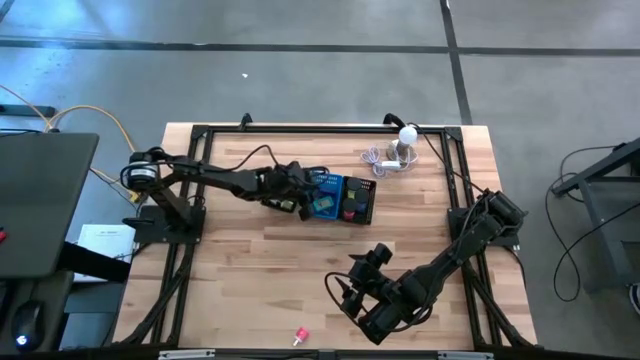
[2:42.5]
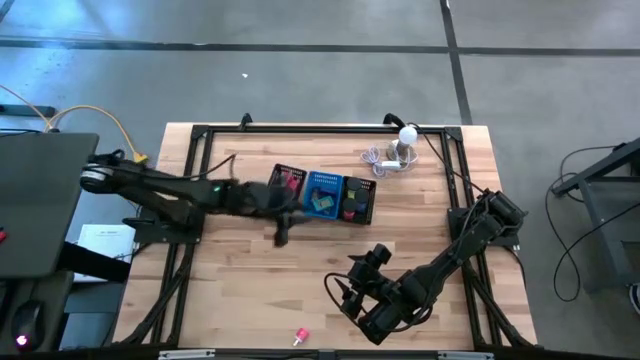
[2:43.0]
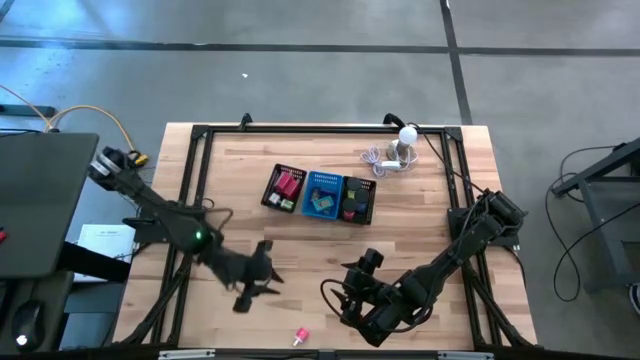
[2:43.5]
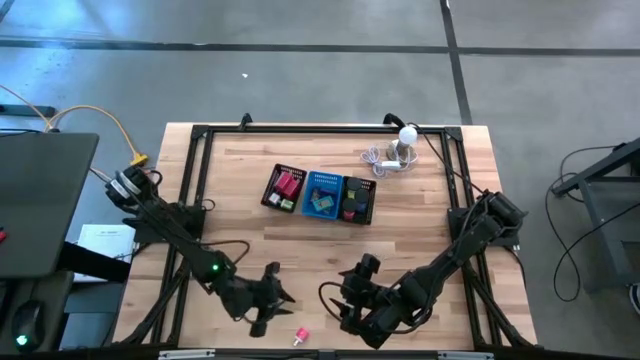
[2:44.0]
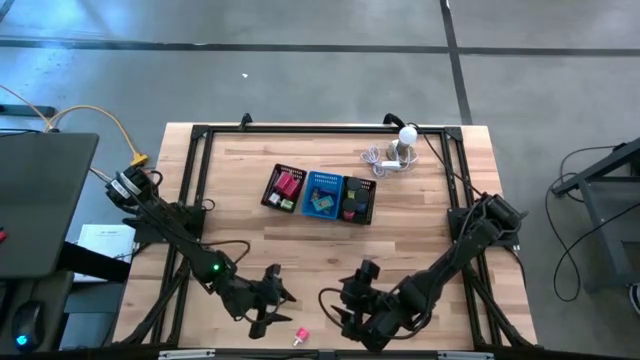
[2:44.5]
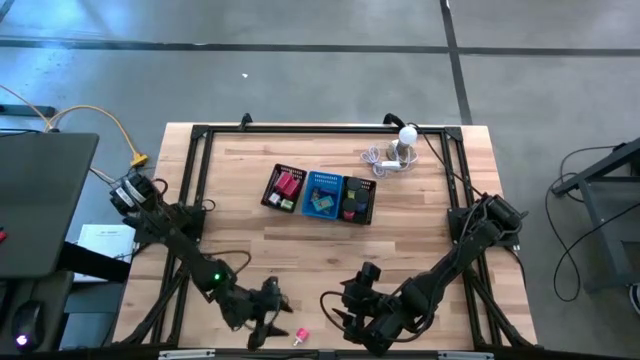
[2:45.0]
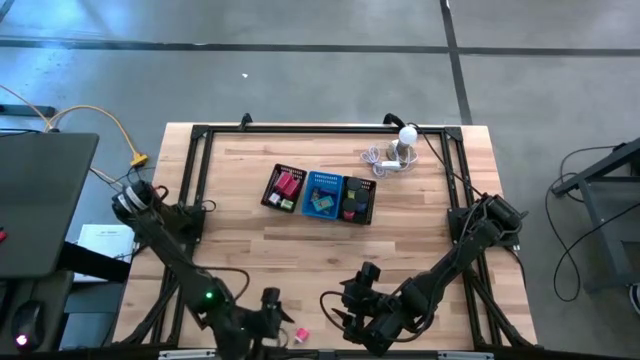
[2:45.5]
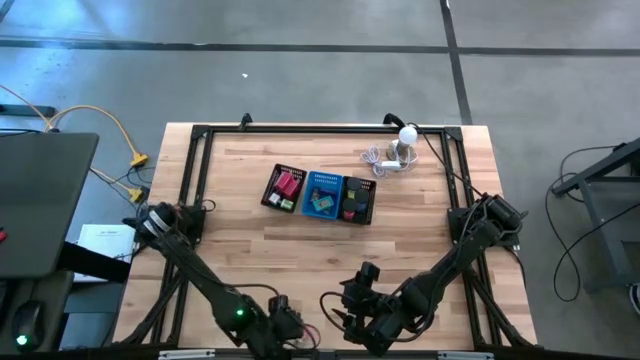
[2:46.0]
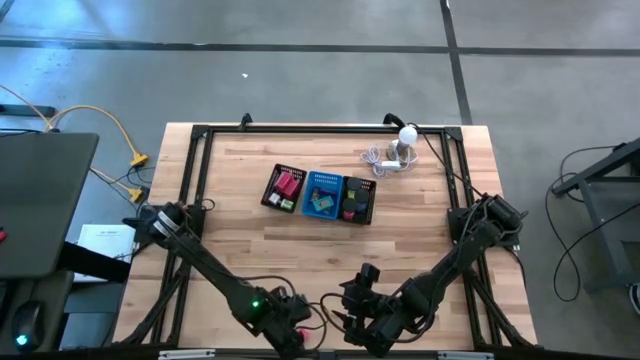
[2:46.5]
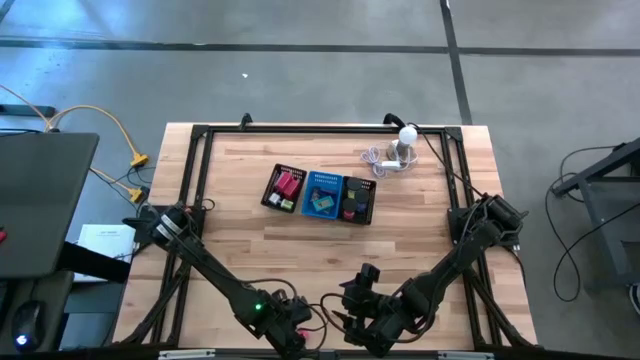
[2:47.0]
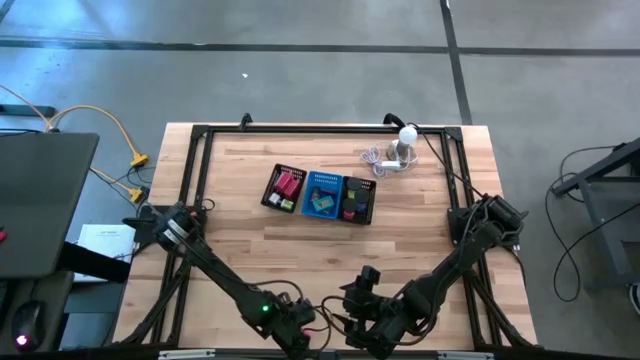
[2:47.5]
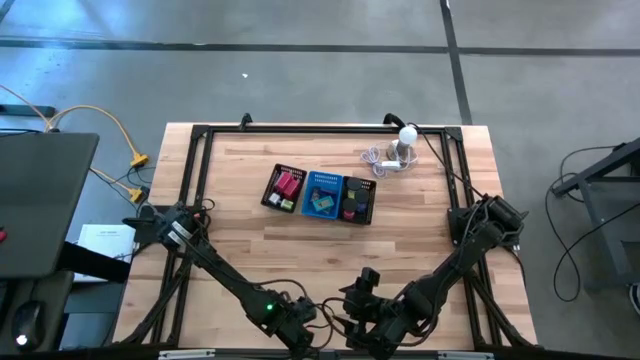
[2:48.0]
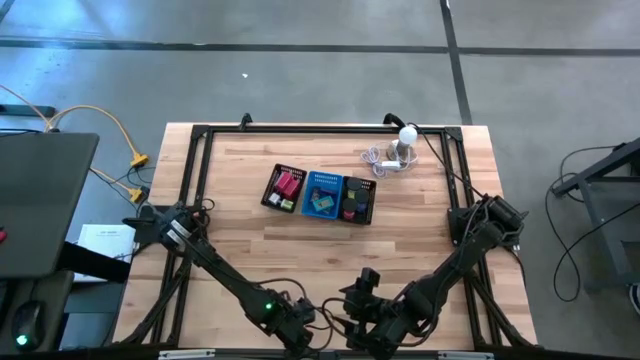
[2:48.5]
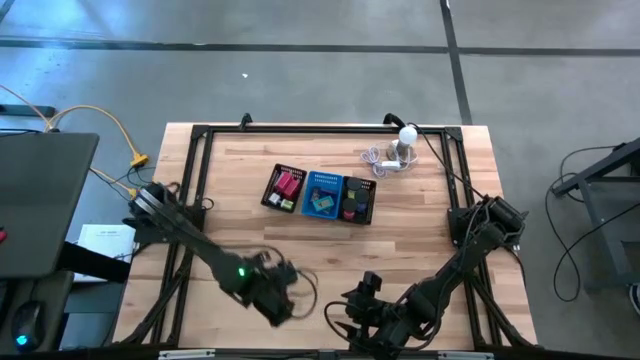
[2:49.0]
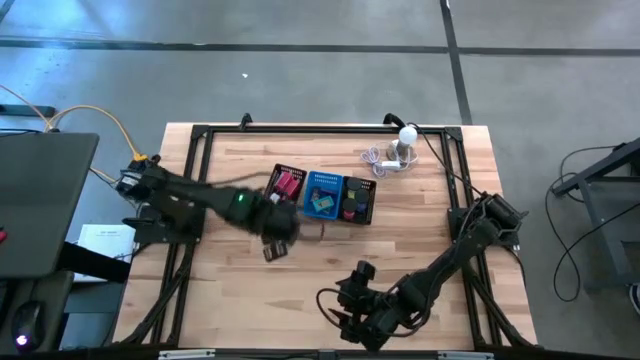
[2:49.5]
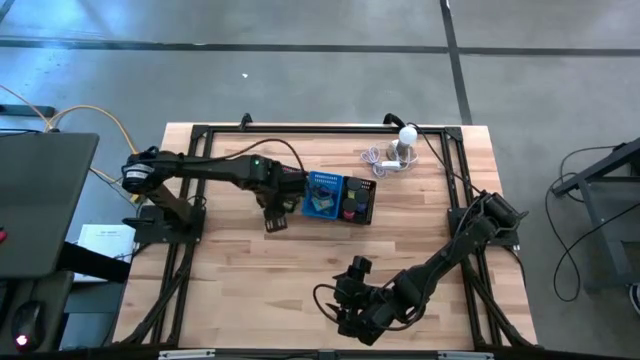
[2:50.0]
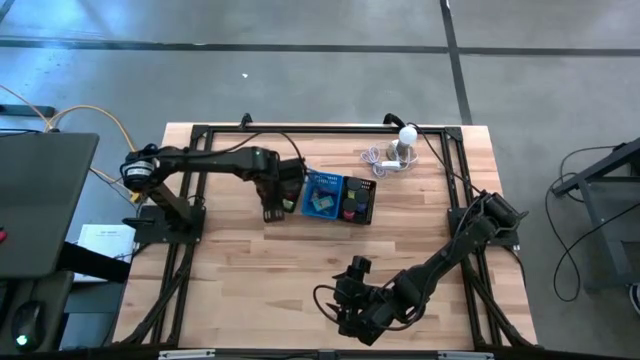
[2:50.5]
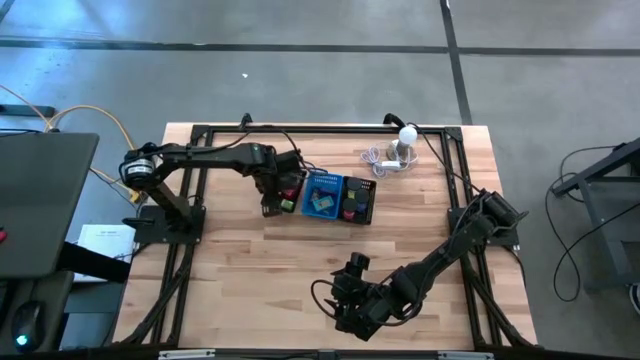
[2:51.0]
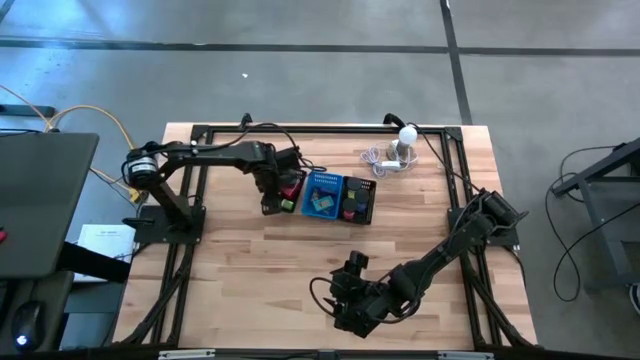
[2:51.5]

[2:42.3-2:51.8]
Task: Pick & Place Office items
Put the pink charger adapter into the left black bin

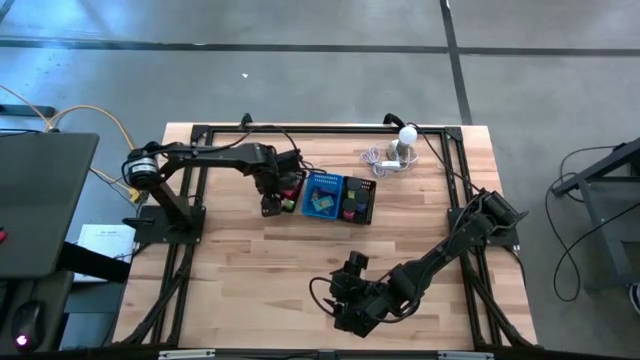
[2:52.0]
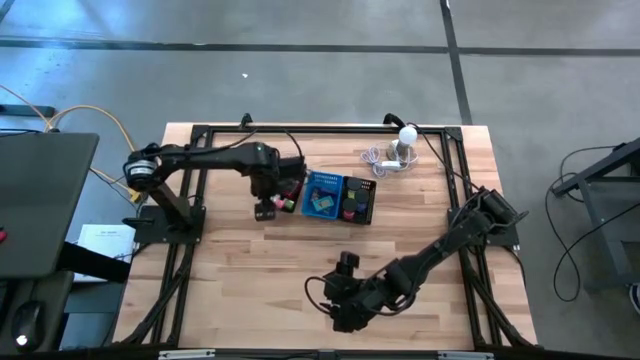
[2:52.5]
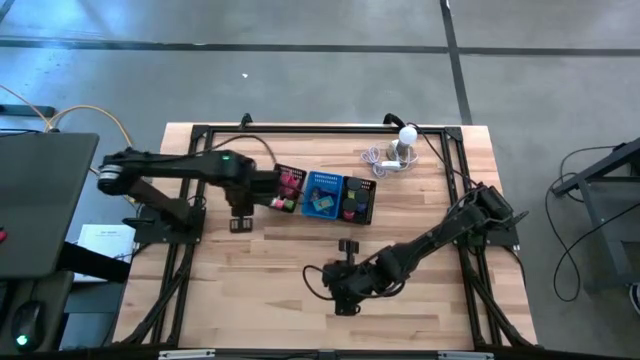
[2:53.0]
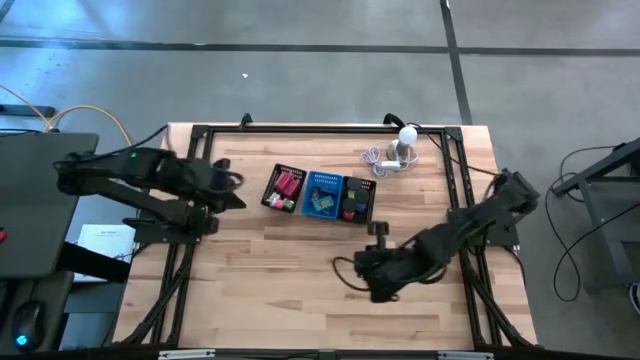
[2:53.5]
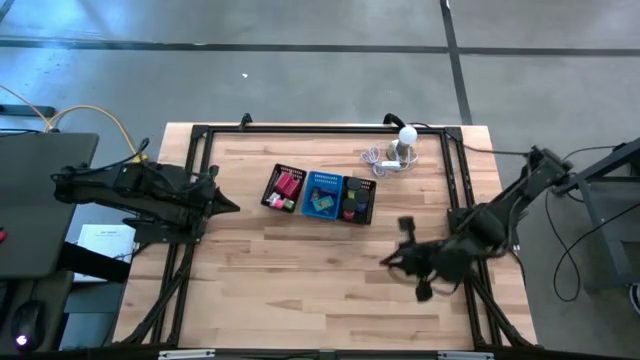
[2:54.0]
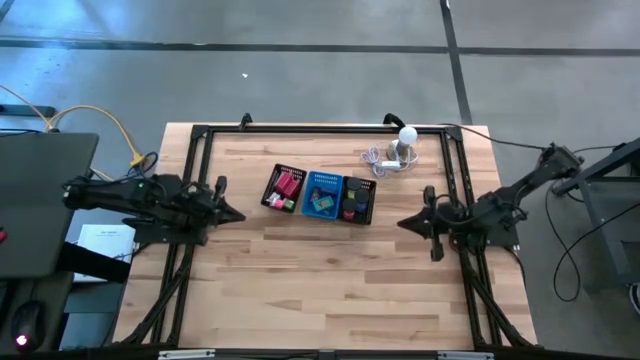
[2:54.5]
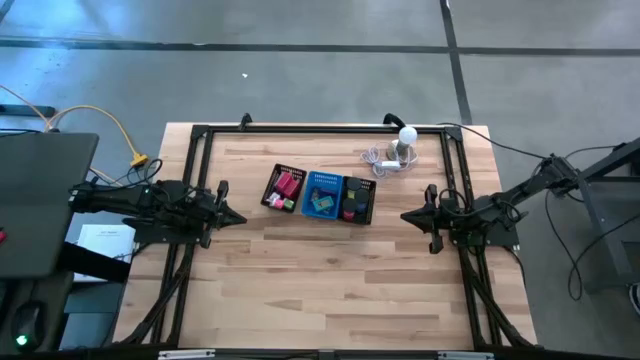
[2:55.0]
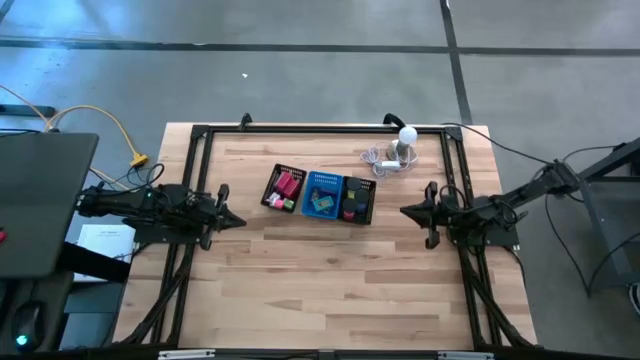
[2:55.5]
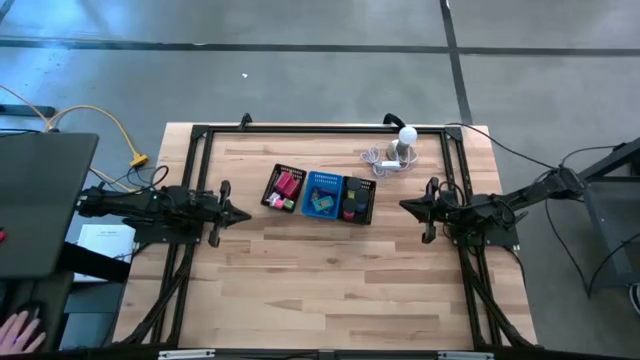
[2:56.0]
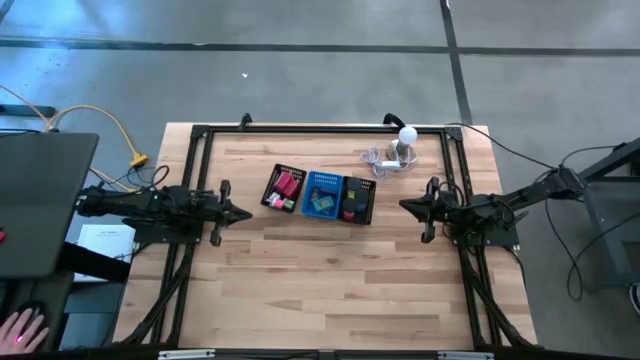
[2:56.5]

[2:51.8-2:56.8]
Return to Home Position

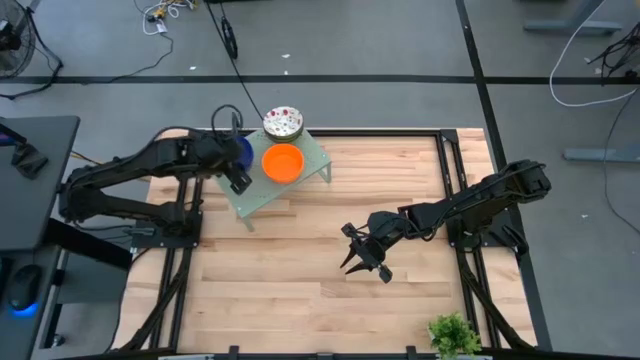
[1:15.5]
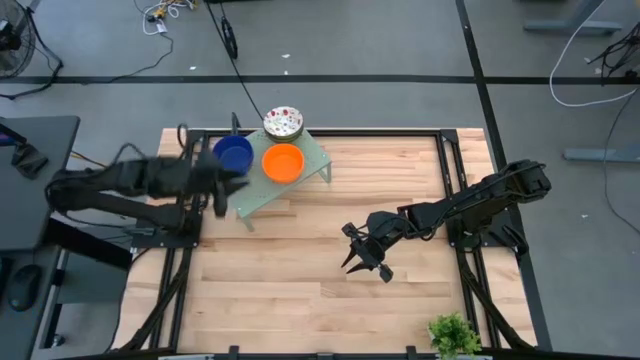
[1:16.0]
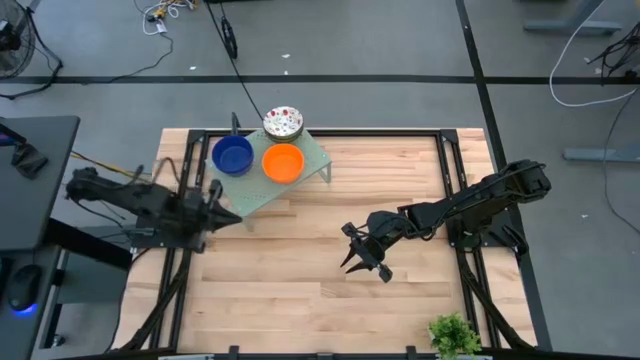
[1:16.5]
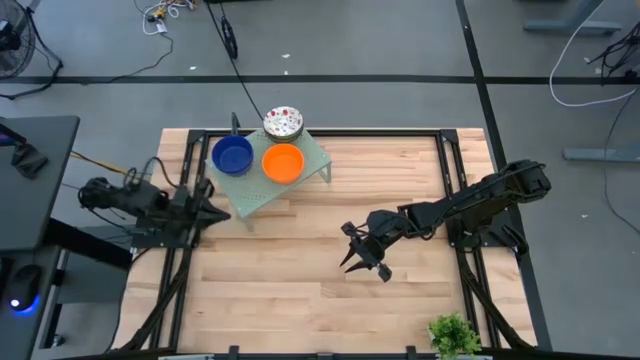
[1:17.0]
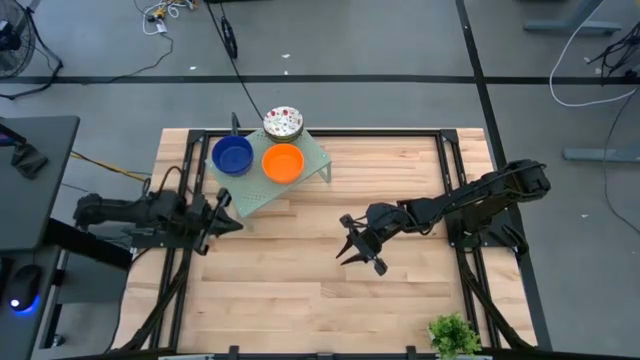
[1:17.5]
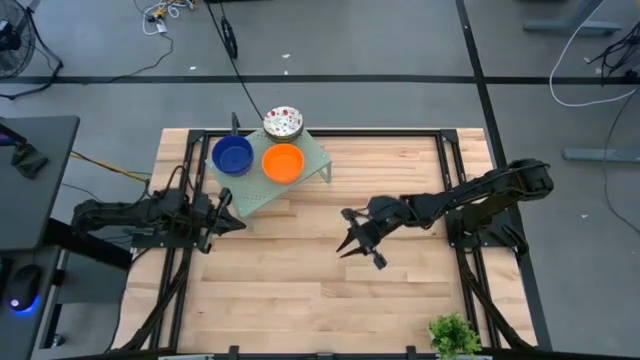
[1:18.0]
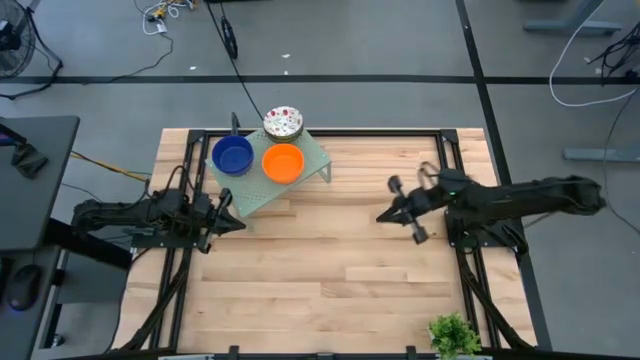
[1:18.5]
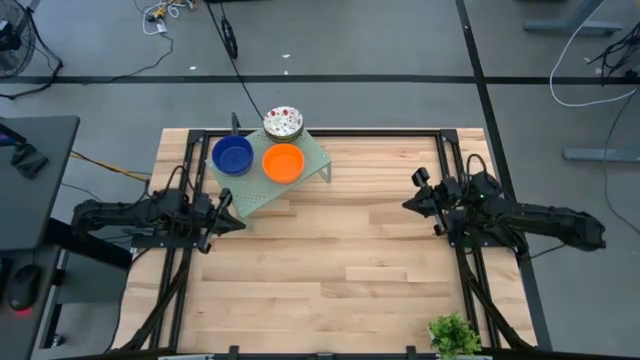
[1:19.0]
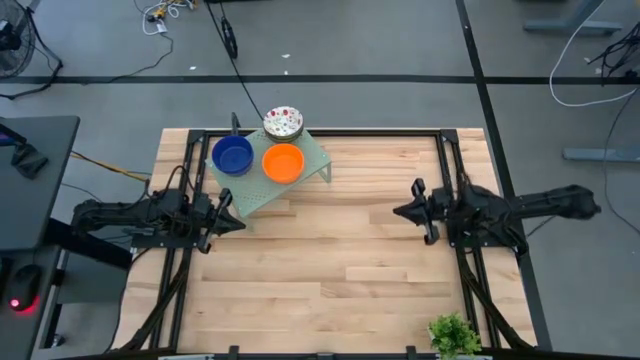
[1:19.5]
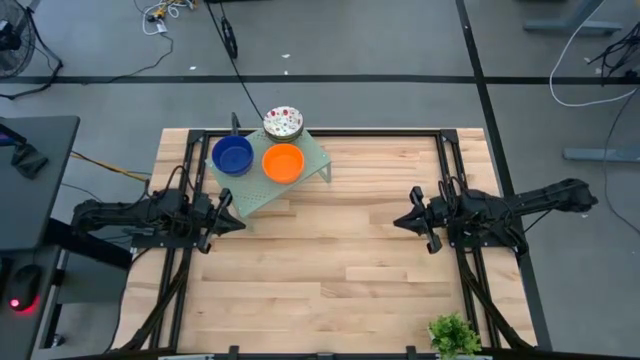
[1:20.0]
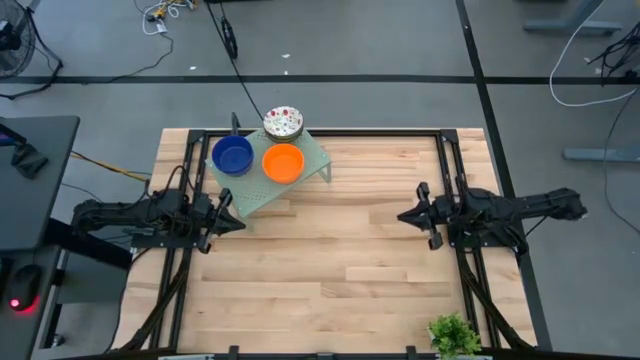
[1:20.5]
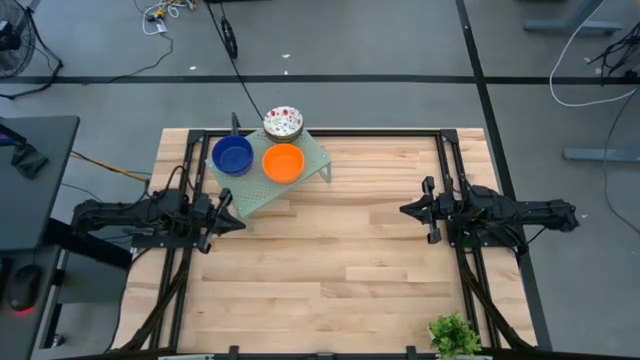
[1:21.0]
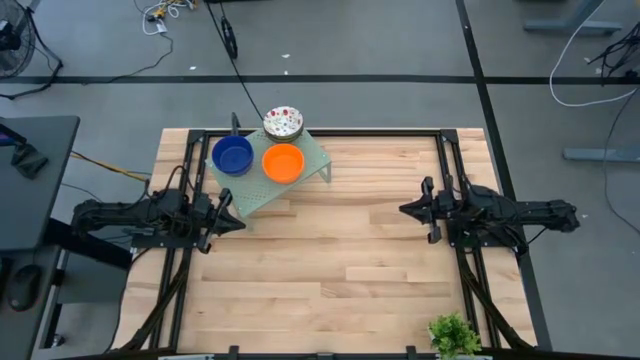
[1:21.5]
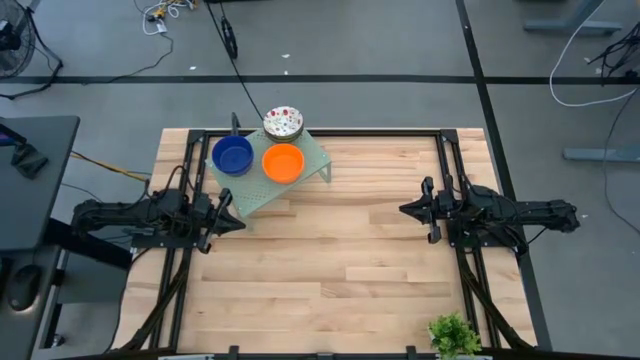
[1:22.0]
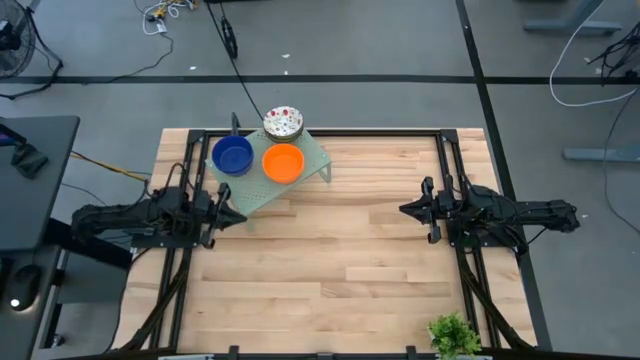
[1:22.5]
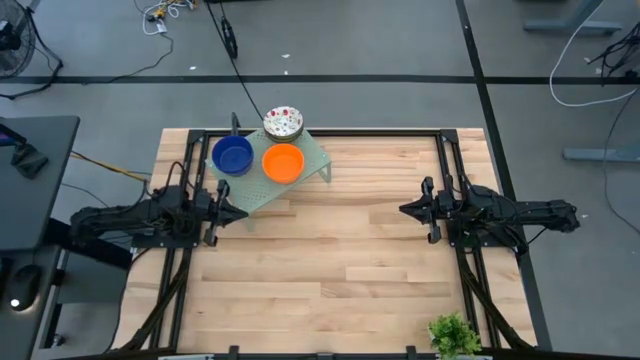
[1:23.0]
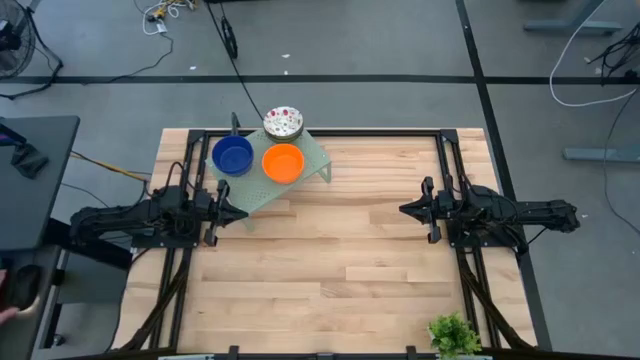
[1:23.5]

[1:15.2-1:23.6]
Task: Pick & Place Mini bowls
Return to Home Position
